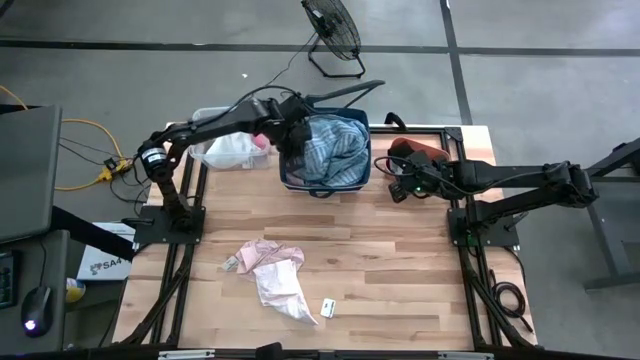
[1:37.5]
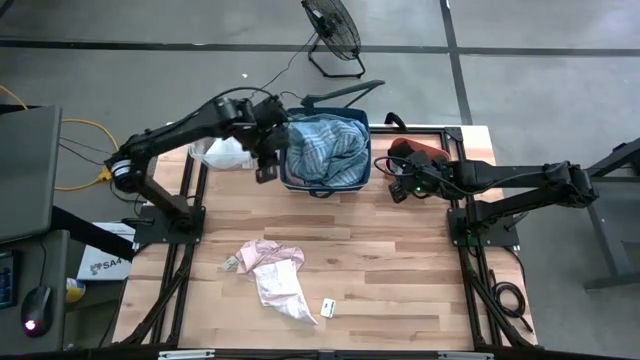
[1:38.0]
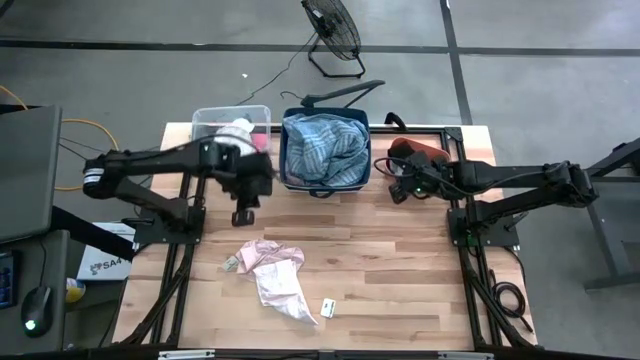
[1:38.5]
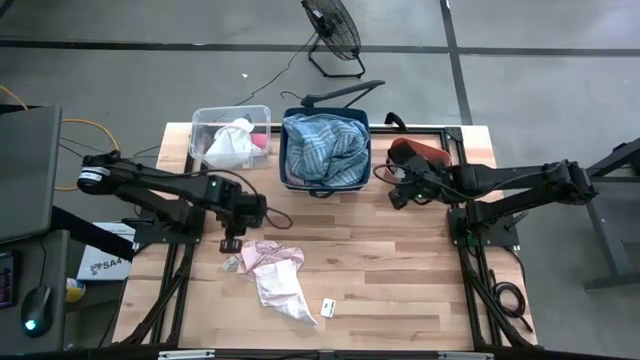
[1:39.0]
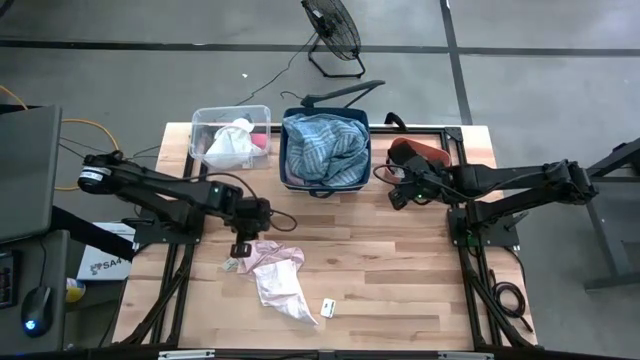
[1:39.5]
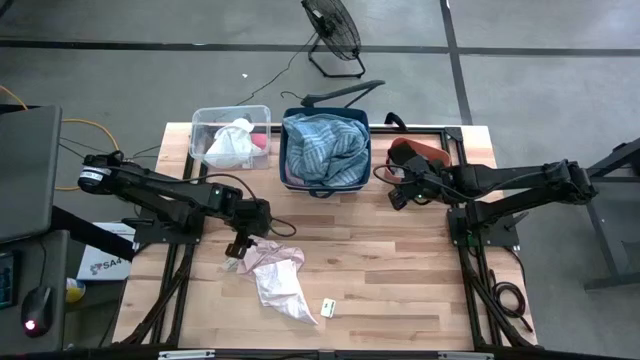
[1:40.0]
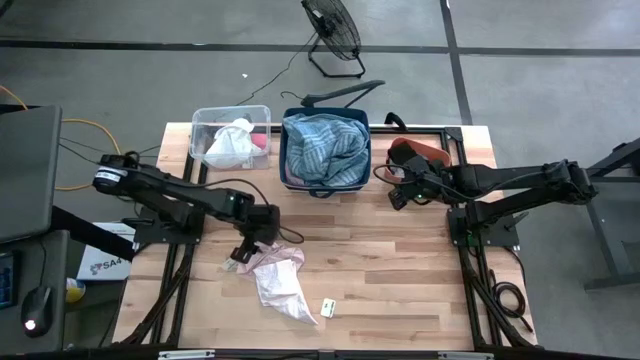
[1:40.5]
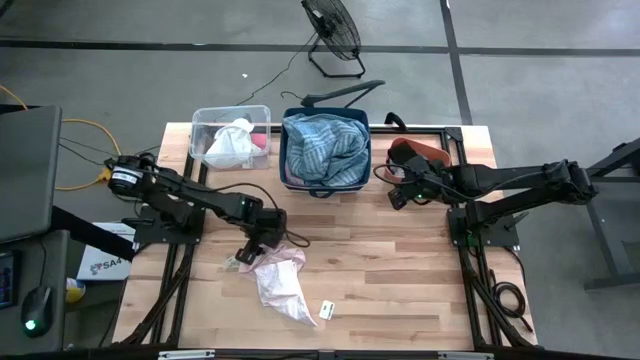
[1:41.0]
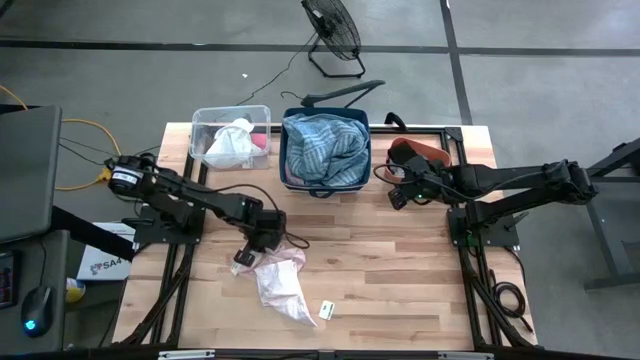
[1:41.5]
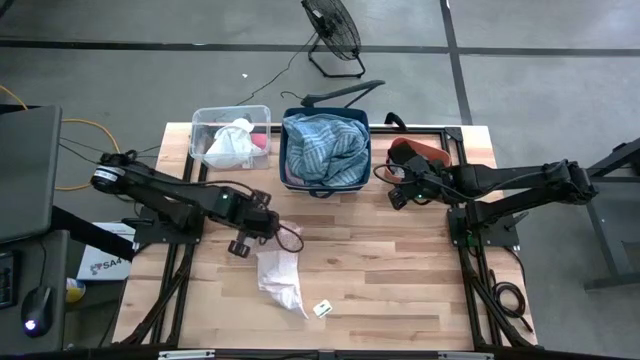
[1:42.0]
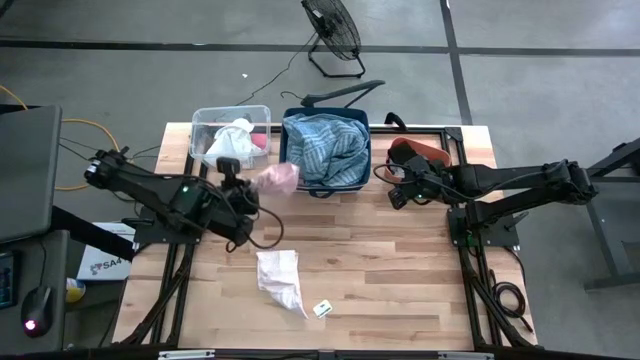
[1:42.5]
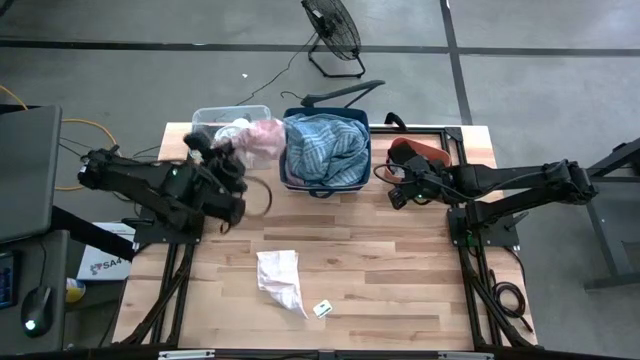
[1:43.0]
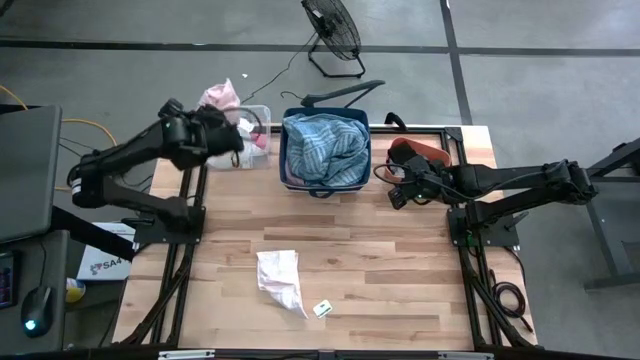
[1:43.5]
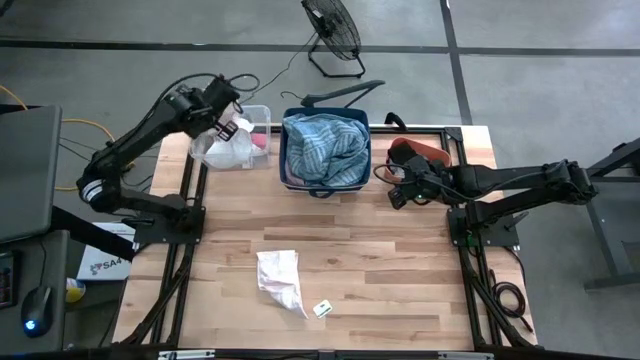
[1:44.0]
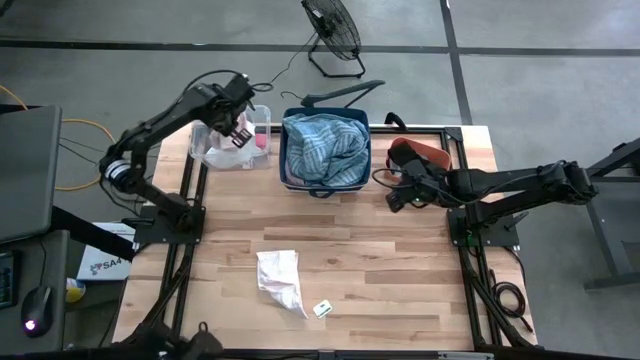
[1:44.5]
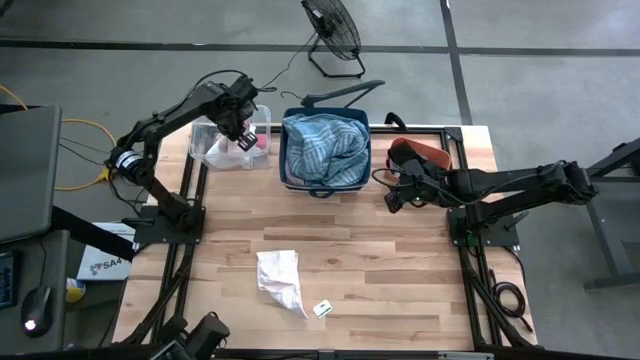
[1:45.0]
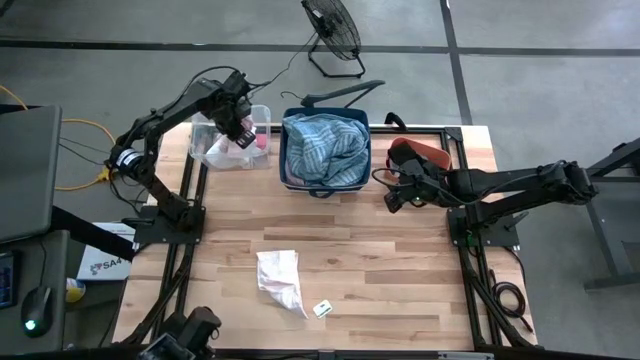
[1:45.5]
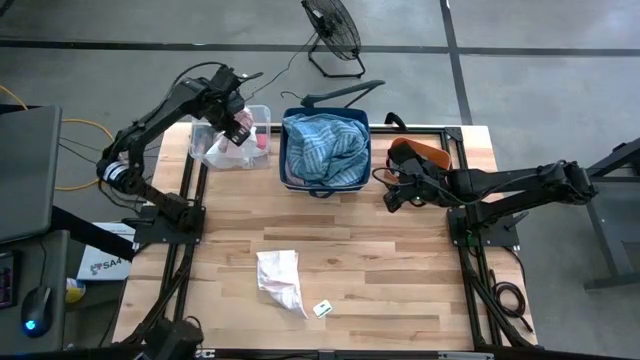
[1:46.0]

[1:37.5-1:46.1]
Task: Pick & Place Cloths
Put the light pink underwear into the transparent bin

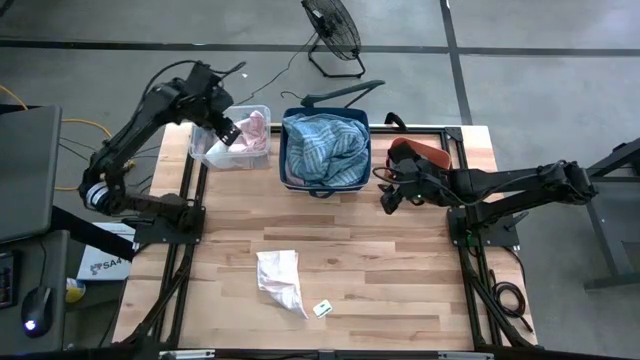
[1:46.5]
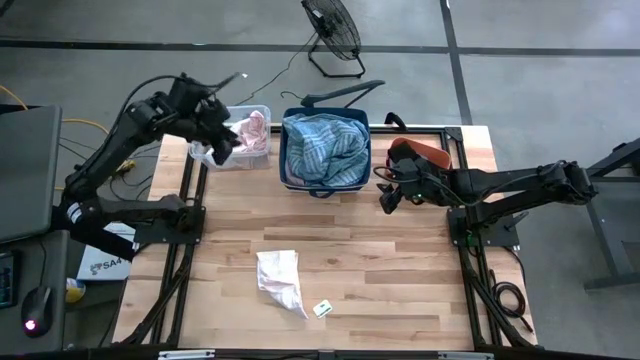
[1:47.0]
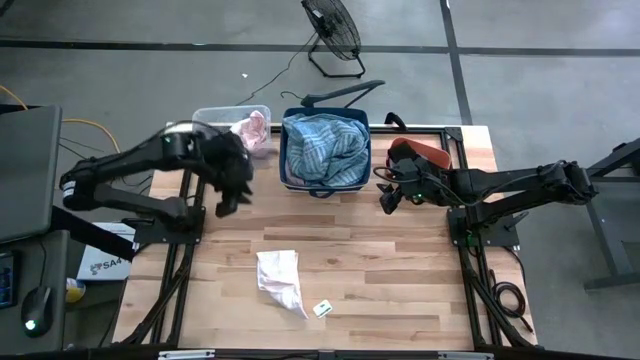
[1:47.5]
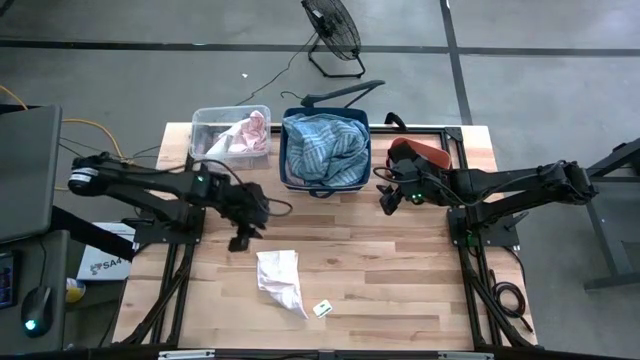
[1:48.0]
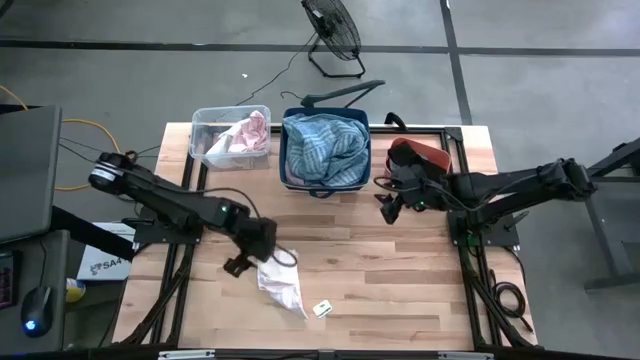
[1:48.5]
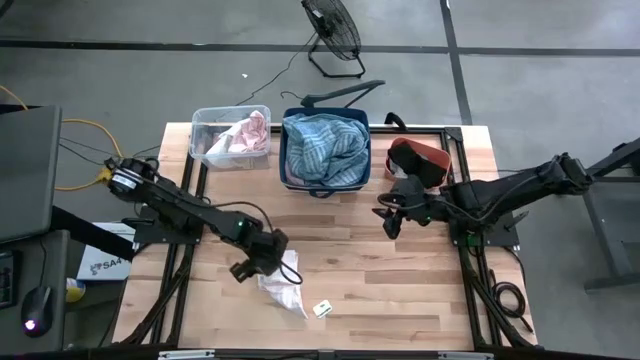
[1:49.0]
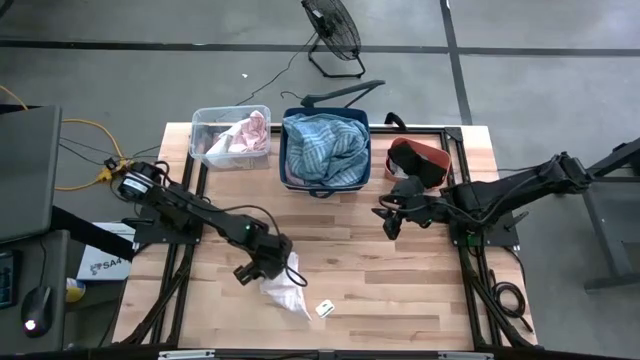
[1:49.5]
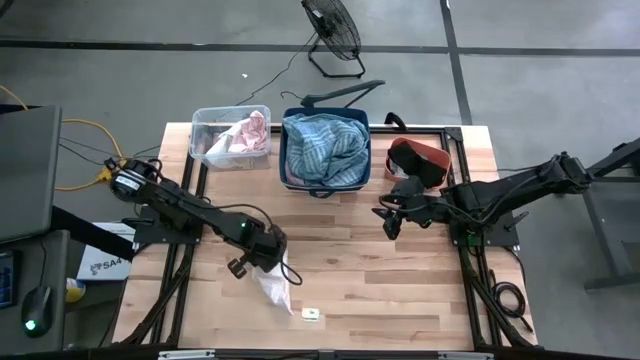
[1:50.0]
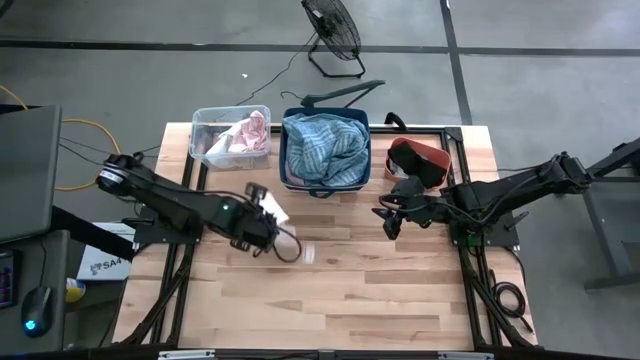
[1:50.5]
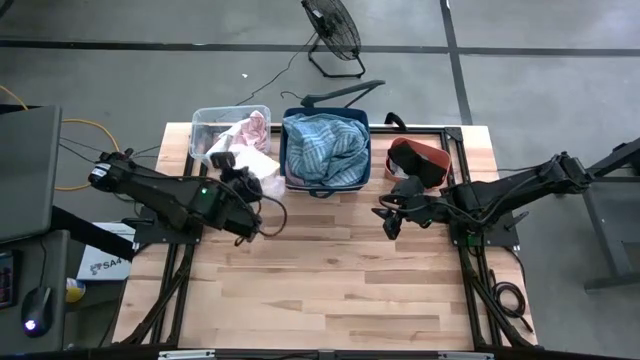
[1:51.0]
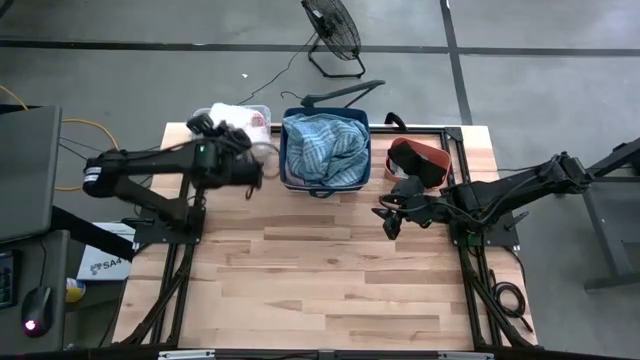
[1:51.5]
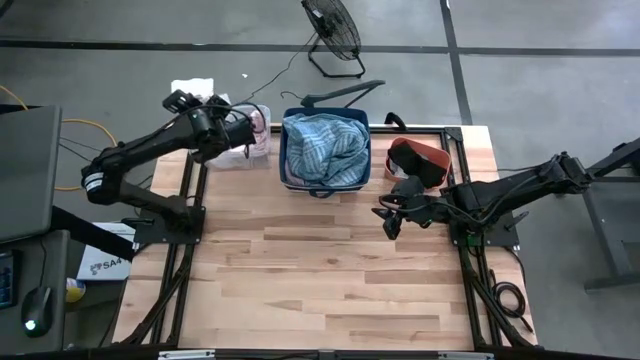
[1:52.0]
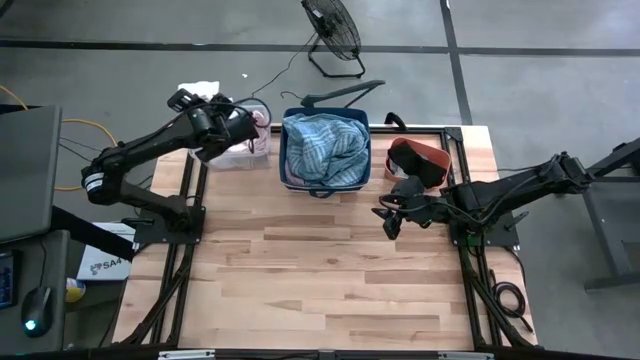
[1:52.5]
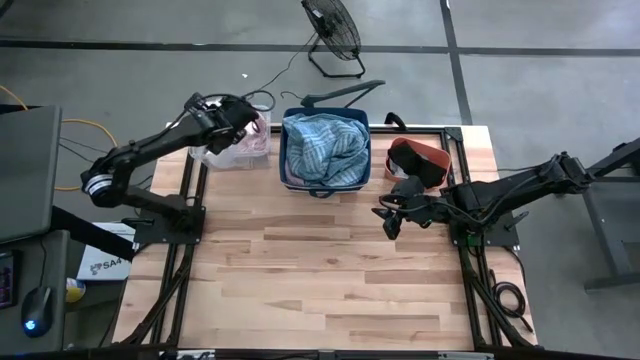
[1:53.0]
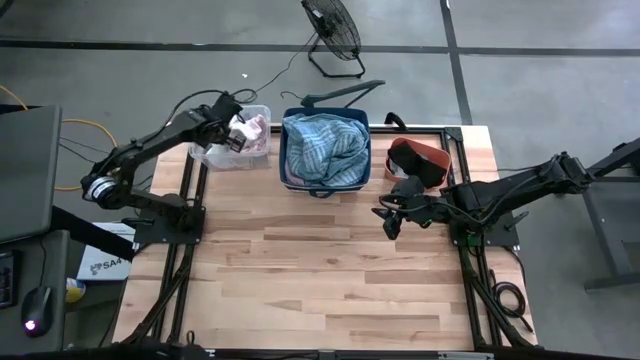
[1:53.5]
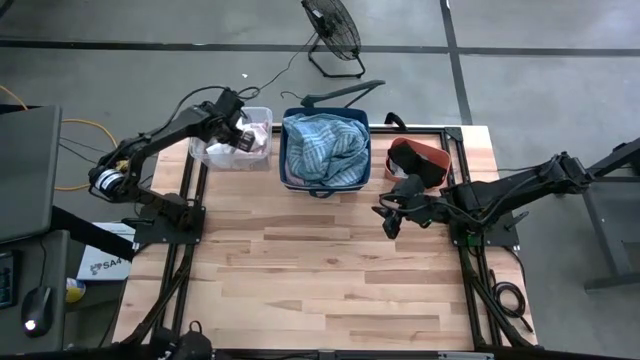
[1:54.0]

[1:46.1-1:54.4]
Put the pink underwear into the transparent bin

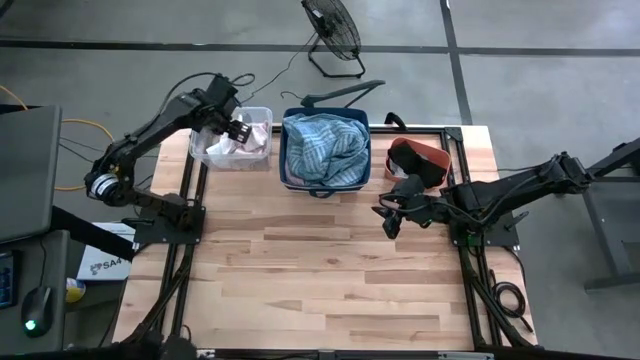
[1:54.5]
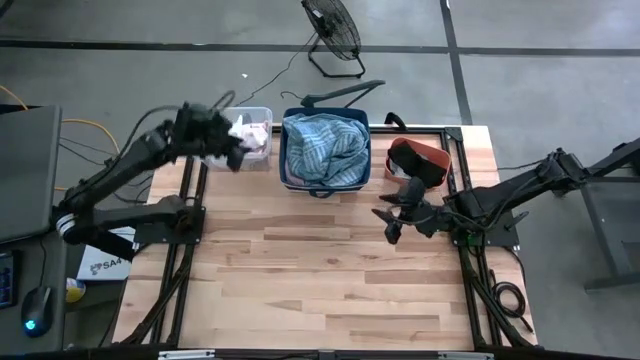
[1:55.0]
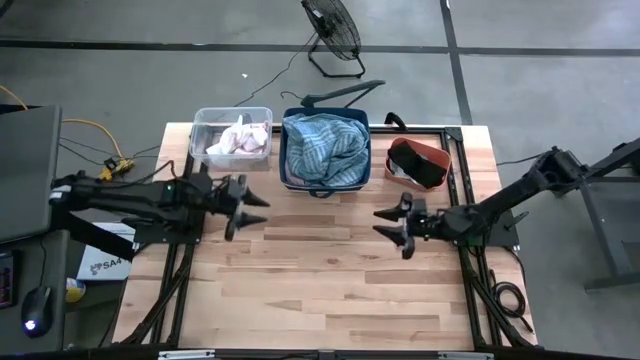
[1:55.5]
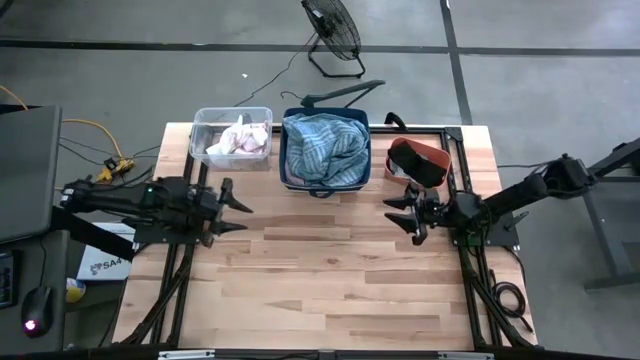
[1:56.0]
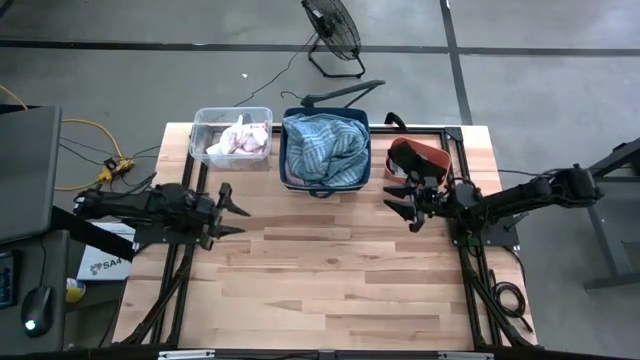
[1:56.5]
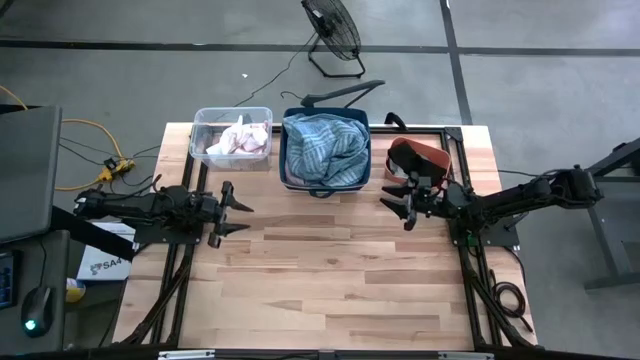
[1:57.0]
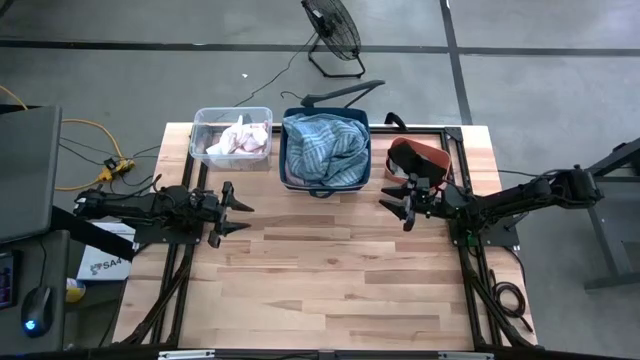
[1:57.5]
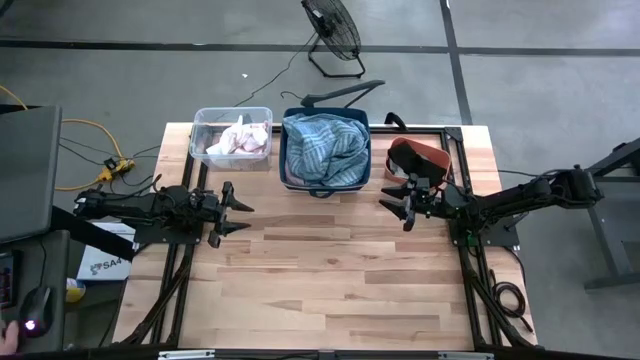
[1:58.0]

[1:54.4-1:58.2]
Return to Home Position
